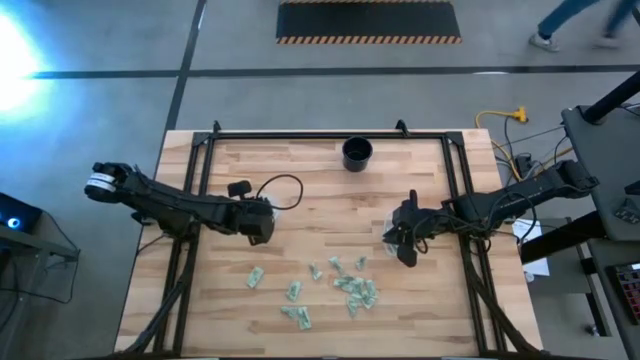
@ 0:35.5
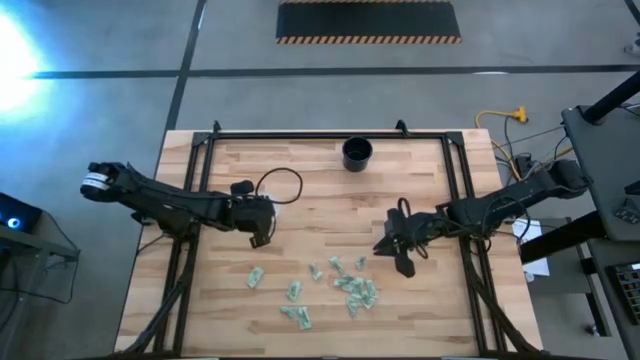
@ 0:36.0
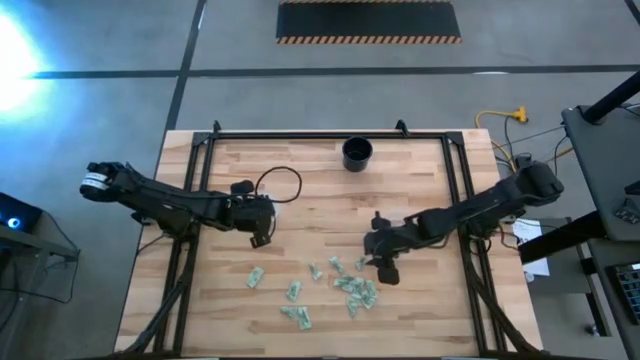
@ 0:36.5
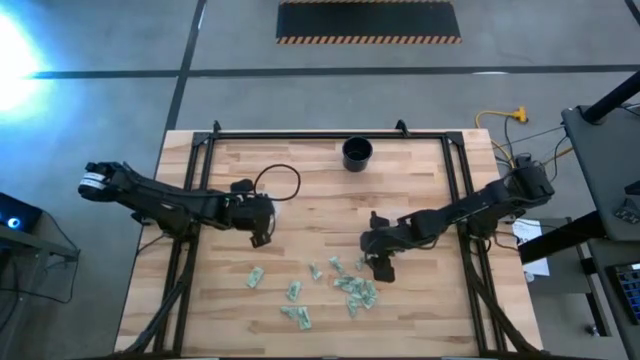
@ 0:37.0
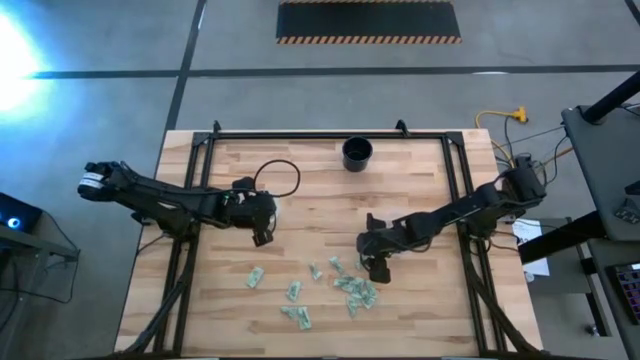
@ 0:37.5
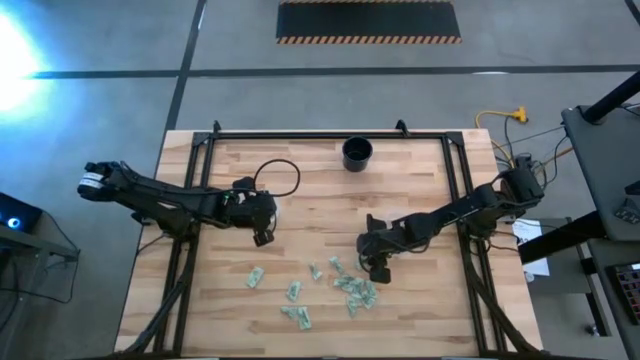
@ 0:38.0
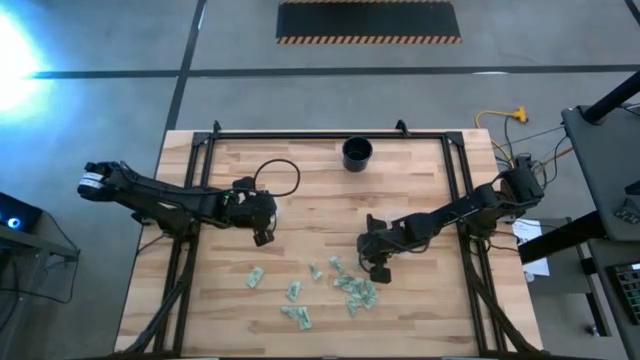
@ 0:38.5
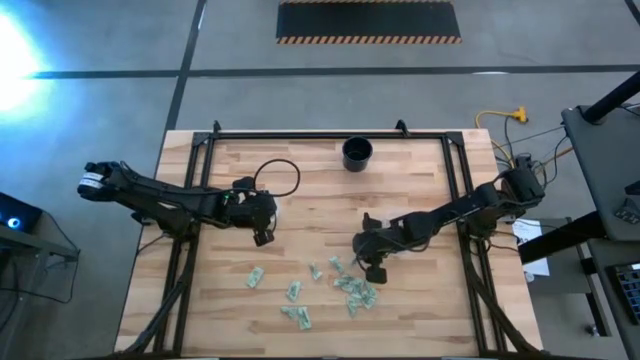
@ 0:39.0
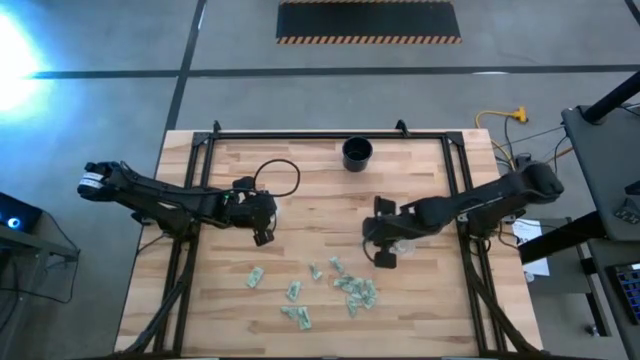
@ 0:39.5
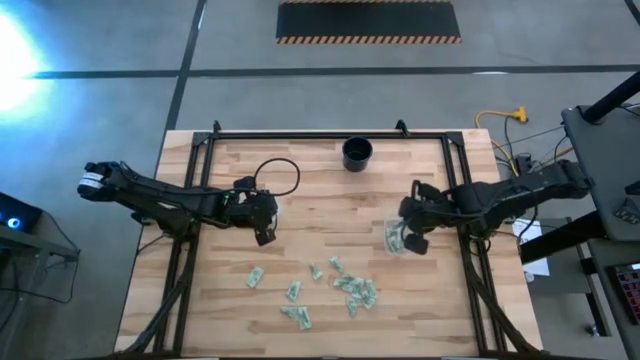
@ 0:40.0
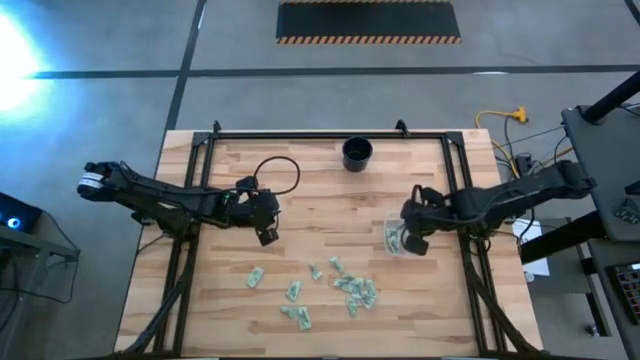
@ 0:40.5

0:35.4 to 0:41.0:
Task: Pick and place items into bin
Put the white sweetener packet into the right transparent bin

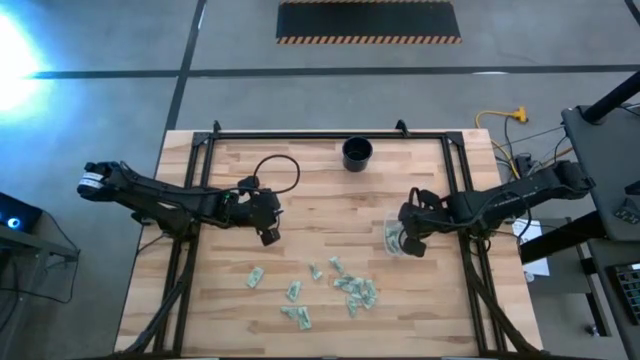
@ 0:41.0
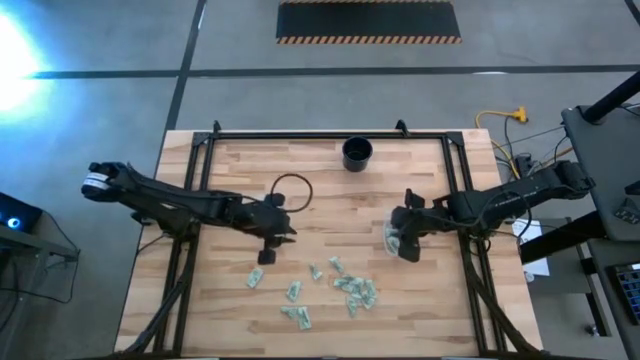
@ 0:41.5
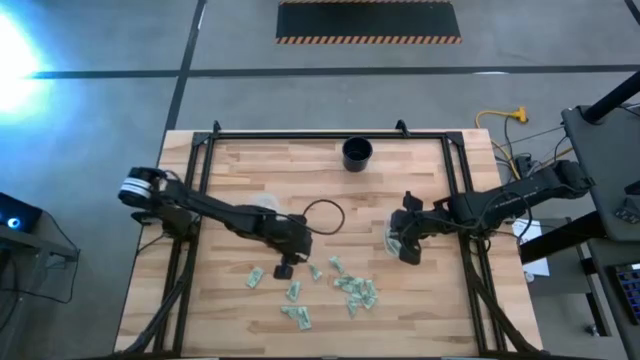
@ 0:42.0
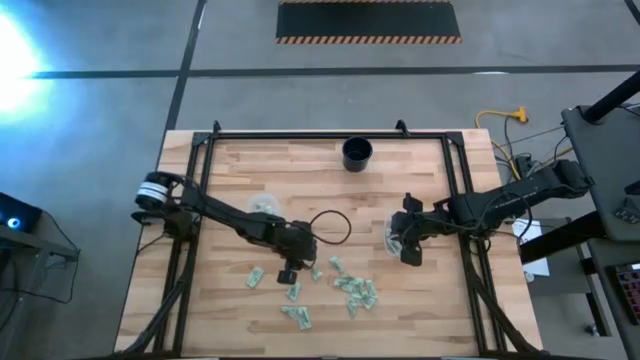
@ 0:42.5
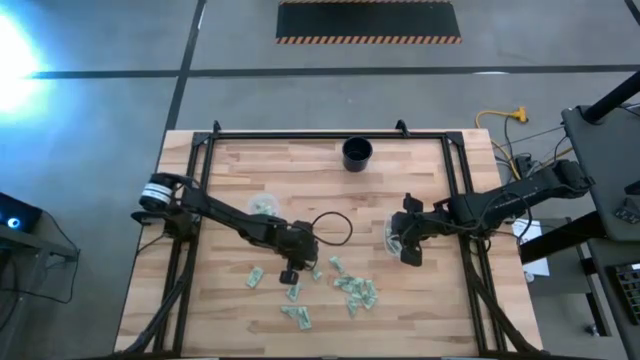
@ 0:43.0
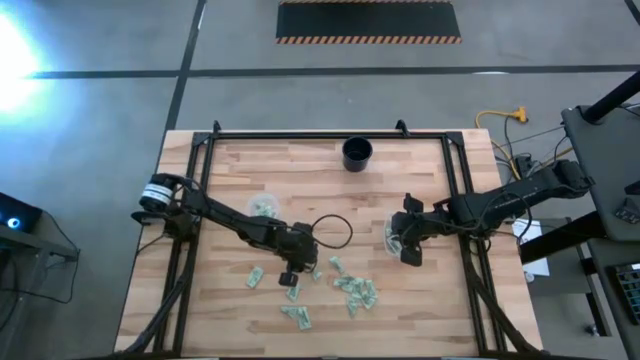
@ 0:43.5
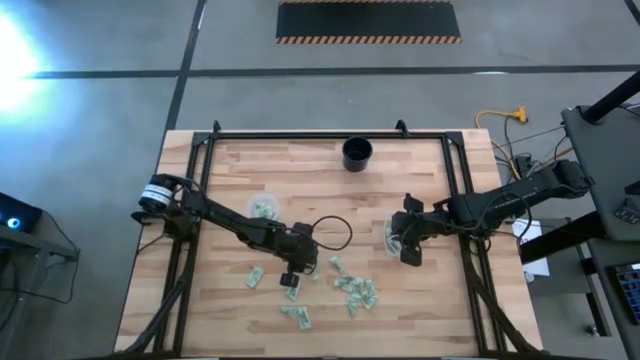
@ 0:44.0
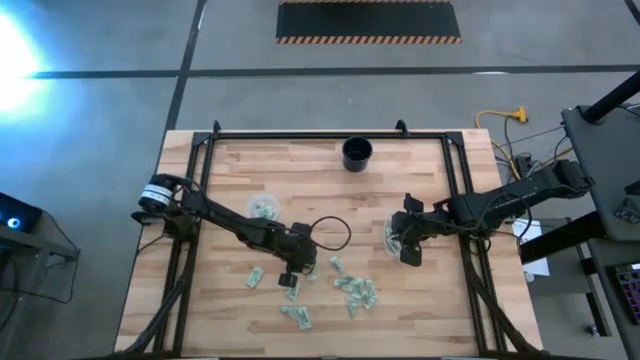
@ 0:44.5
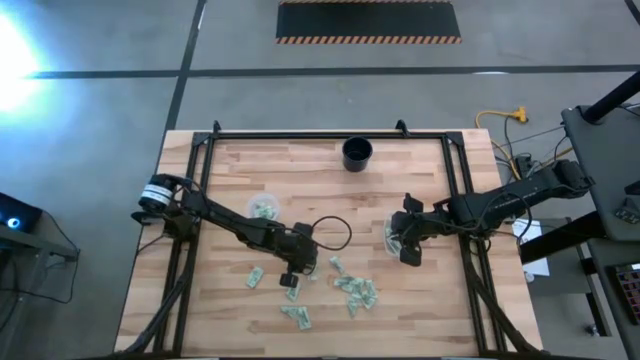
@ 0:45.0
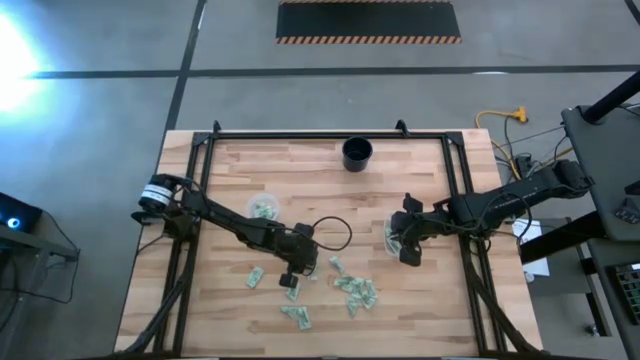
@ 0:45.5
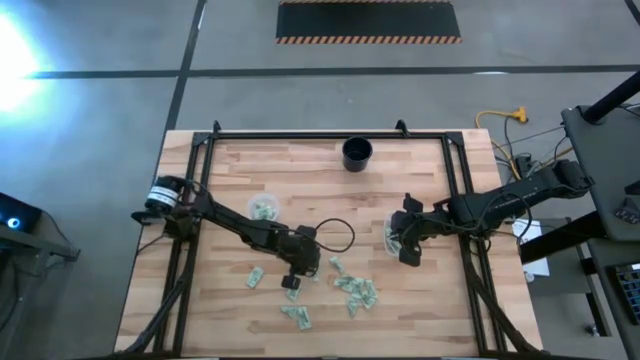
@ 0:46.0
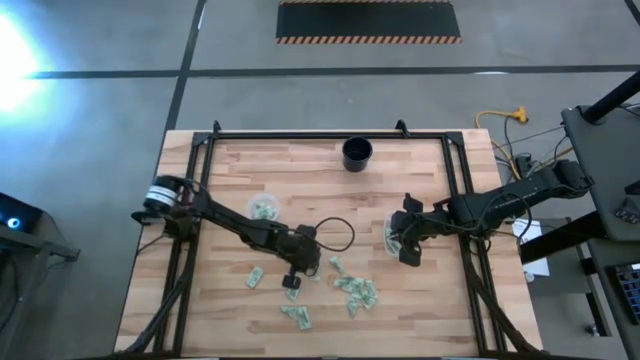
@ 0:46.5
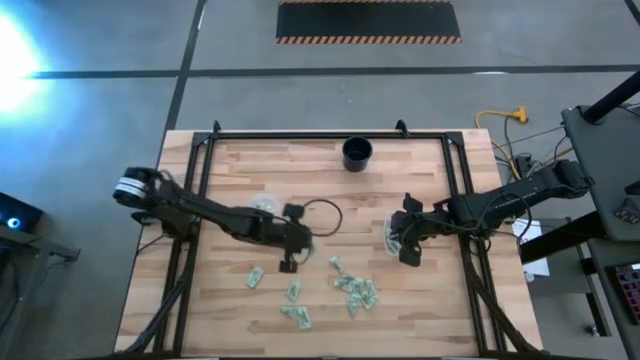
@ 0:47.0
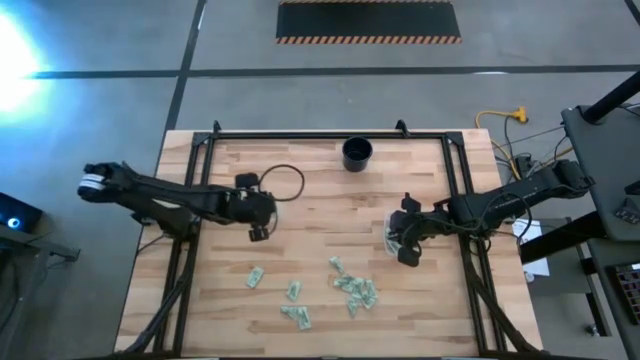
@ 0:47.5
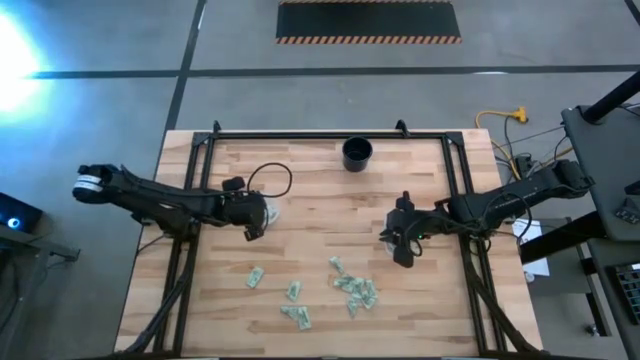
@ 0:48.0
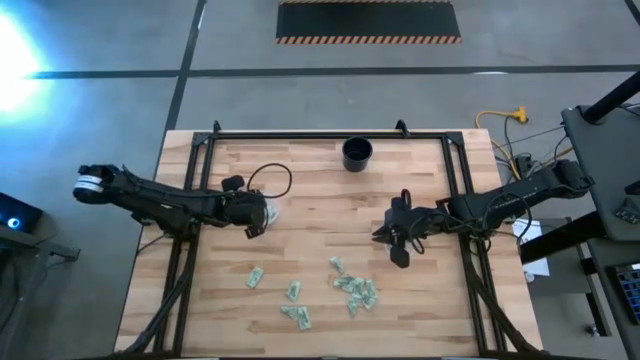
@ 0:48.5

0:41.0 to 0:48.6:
Put the white sweetener packet into the left transparent bin

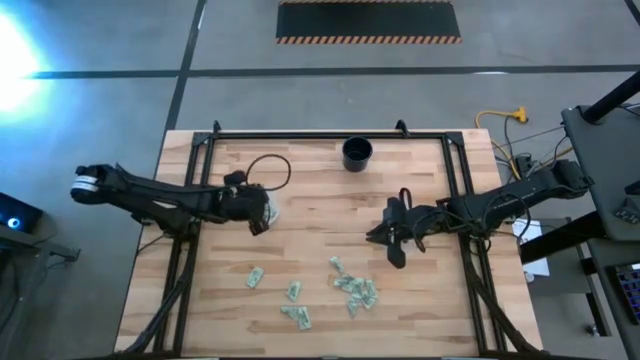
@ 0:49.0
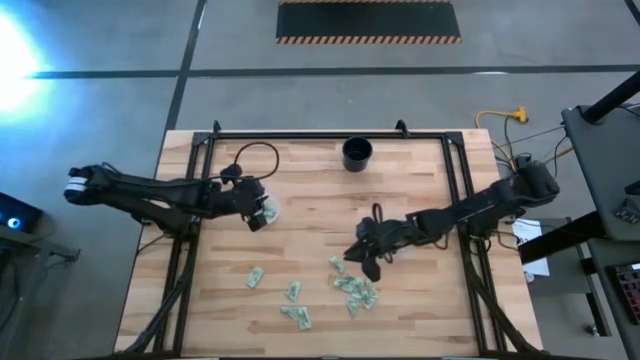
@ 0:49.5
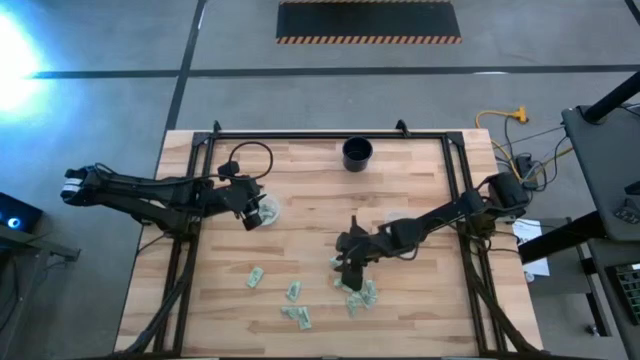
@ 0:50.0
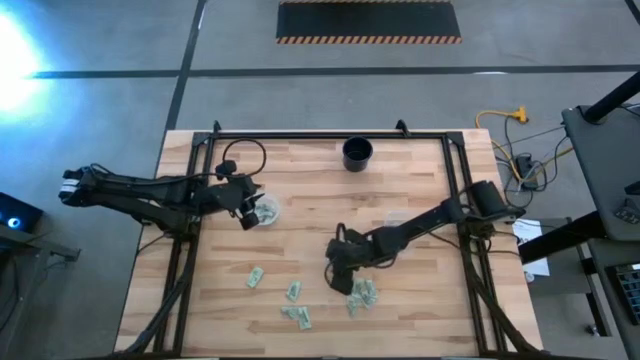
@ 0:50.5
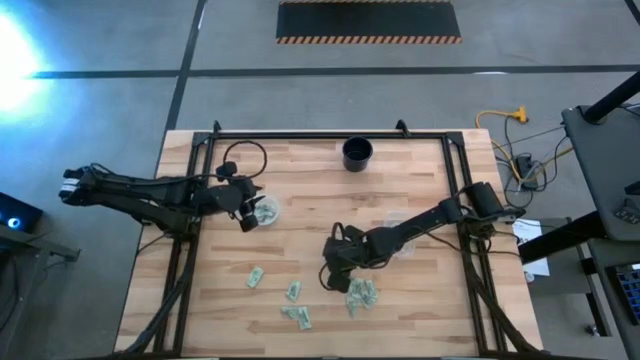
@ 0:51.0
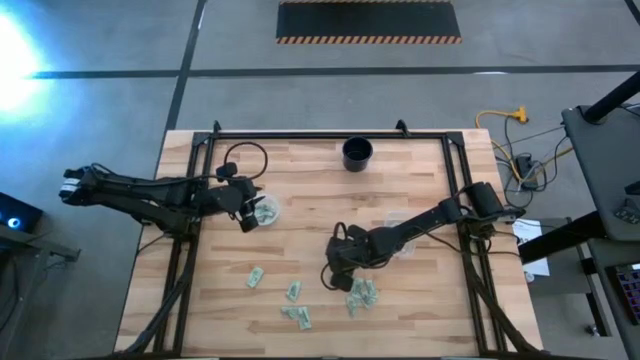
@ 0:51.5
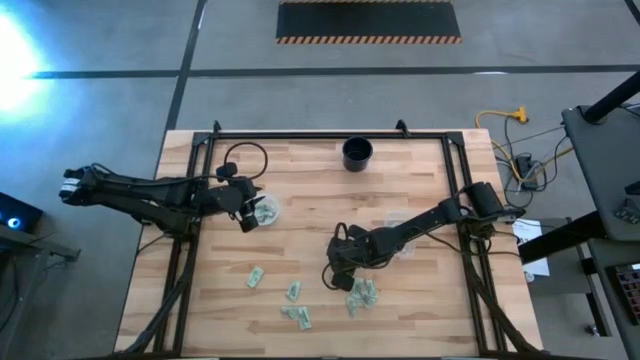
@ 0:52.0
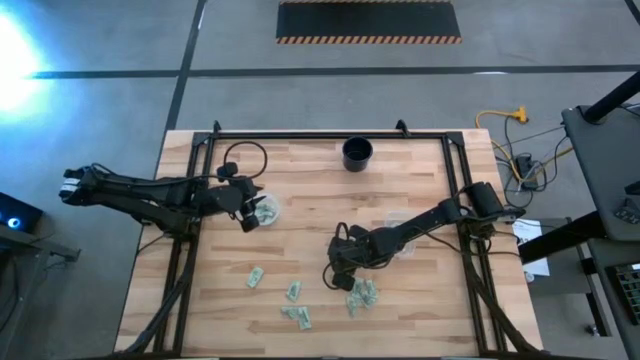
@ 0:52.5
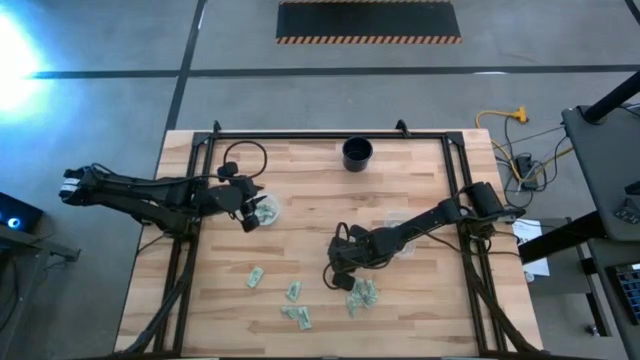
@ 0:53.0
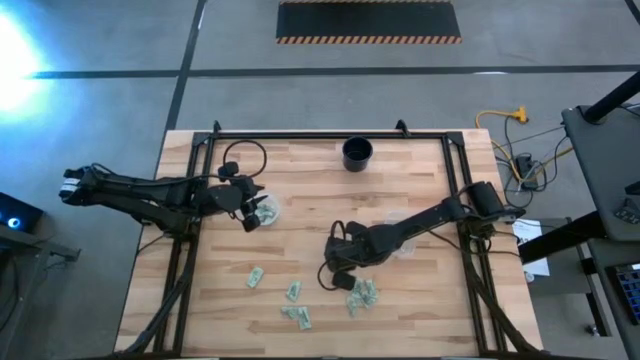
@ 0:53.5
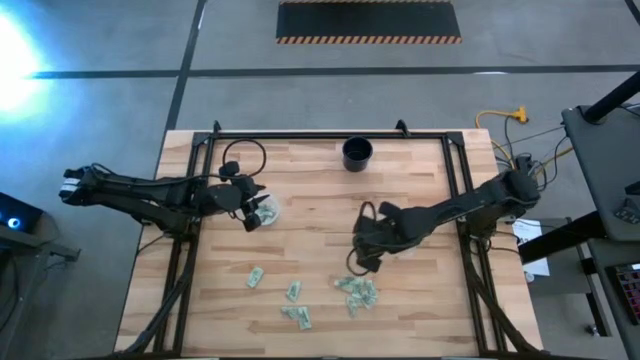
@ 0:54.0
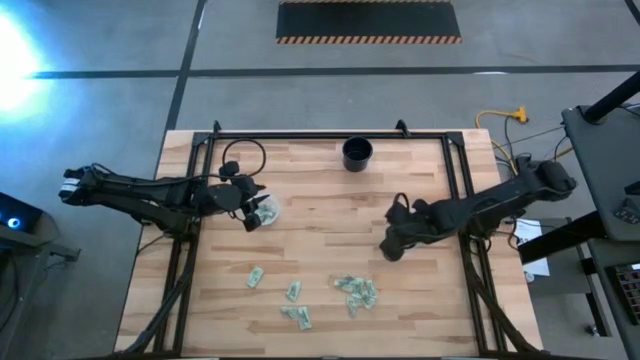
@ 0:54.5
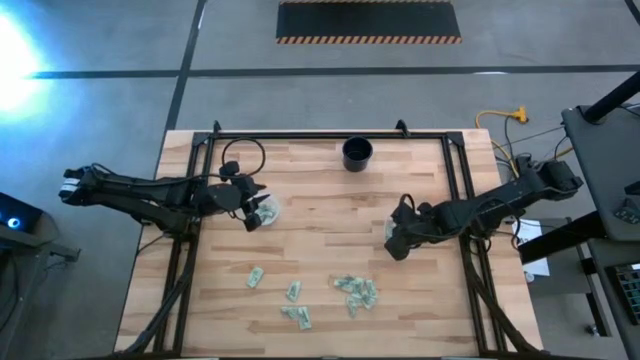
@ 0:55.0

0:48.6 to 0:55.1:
Put the white sweetener packet into the right transparent bin
